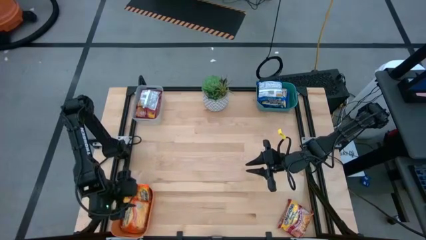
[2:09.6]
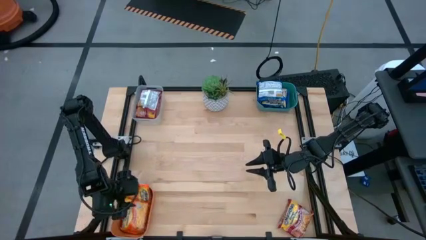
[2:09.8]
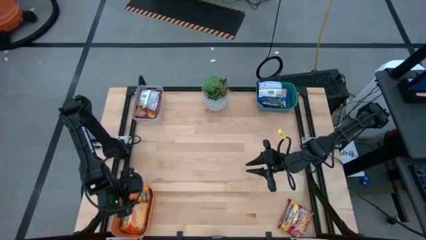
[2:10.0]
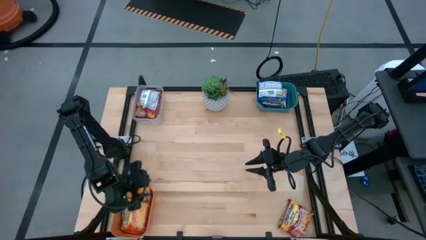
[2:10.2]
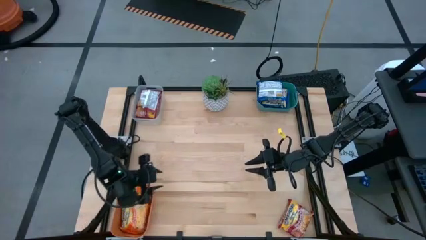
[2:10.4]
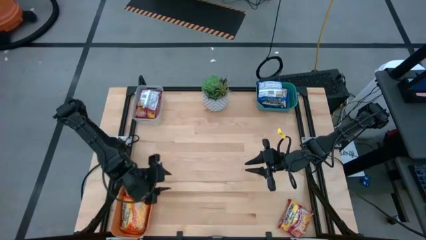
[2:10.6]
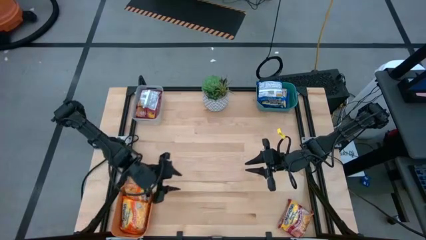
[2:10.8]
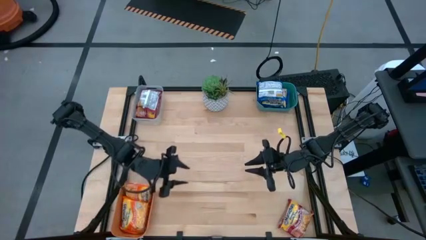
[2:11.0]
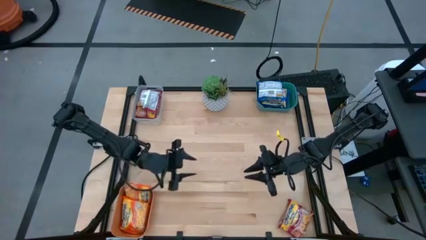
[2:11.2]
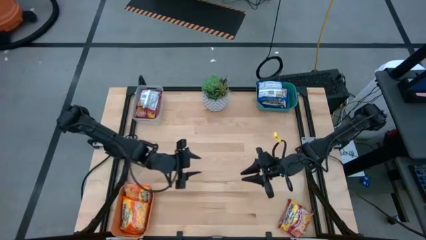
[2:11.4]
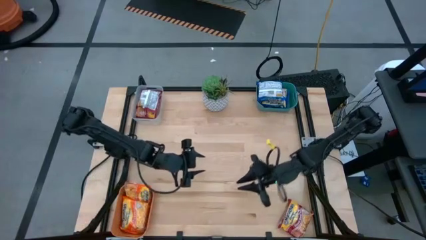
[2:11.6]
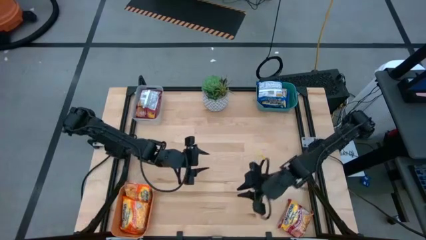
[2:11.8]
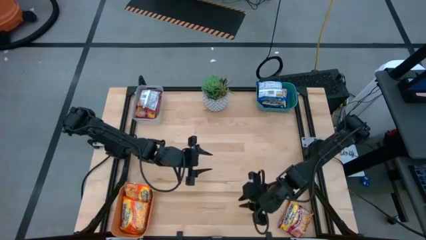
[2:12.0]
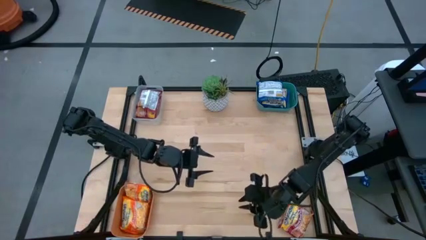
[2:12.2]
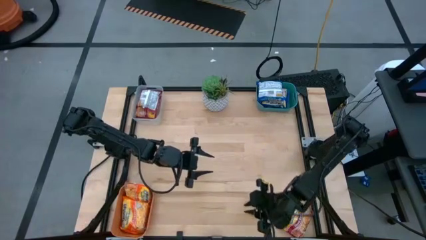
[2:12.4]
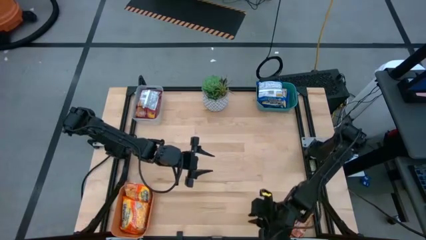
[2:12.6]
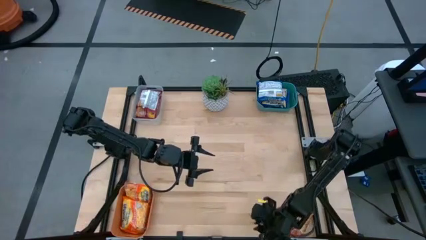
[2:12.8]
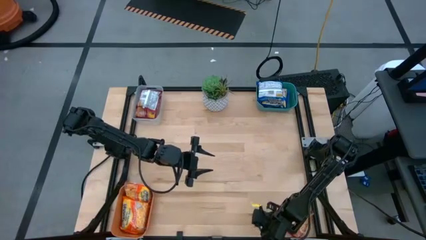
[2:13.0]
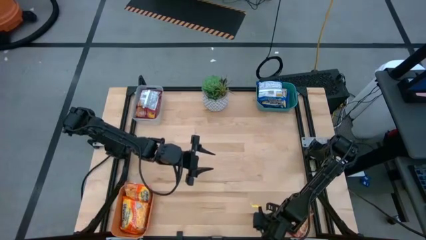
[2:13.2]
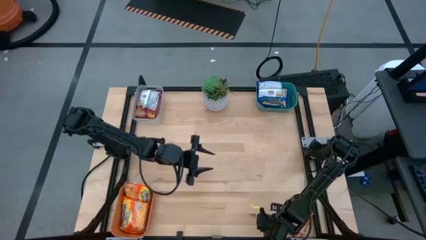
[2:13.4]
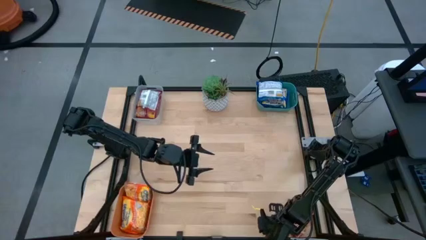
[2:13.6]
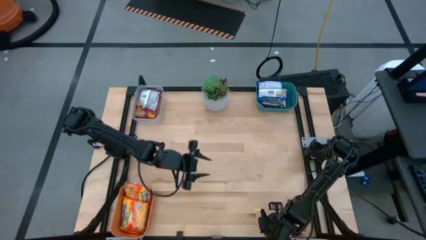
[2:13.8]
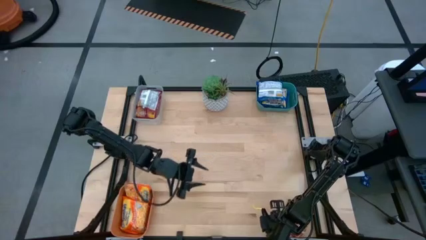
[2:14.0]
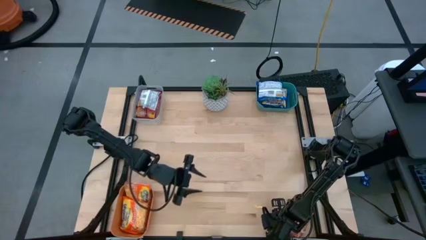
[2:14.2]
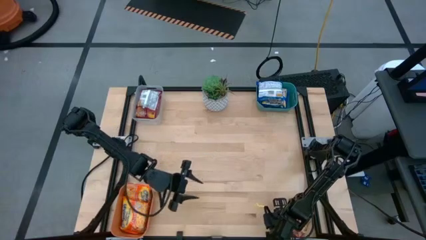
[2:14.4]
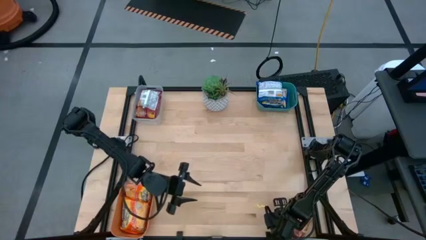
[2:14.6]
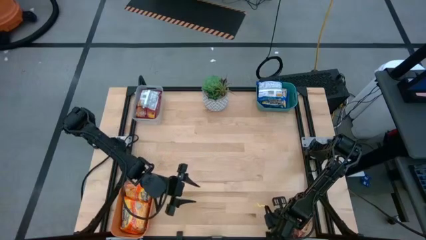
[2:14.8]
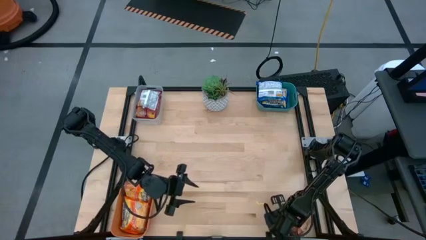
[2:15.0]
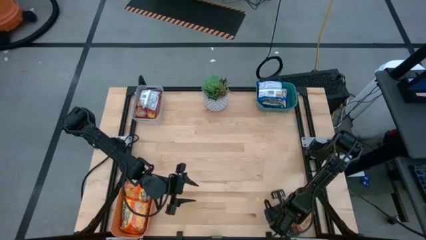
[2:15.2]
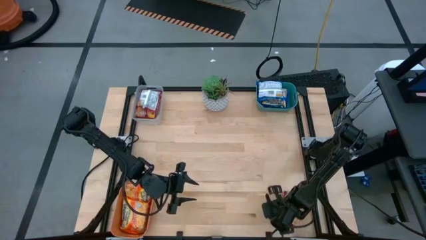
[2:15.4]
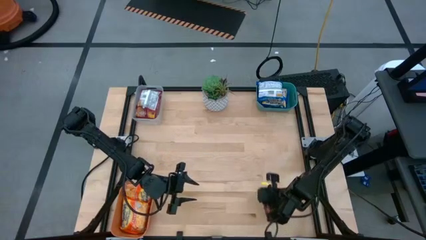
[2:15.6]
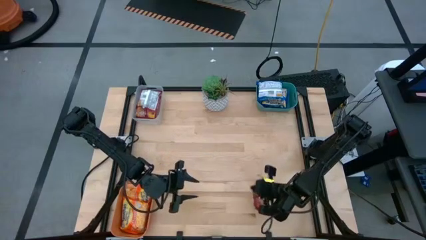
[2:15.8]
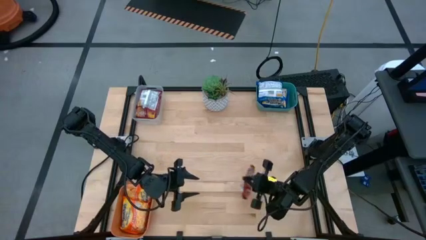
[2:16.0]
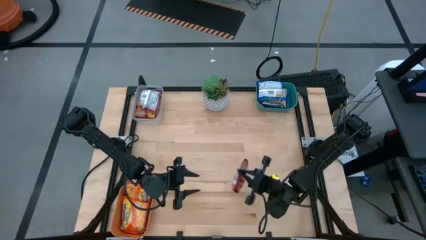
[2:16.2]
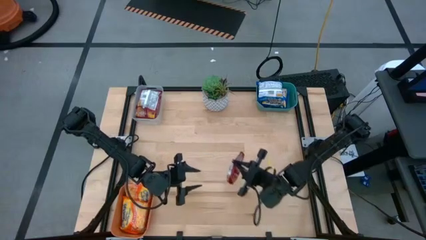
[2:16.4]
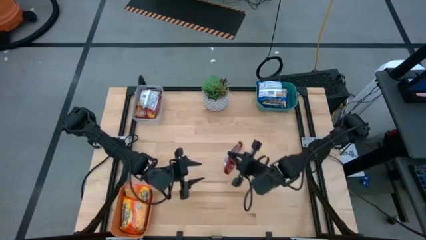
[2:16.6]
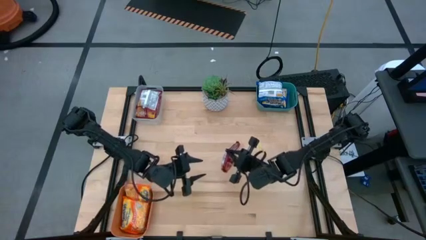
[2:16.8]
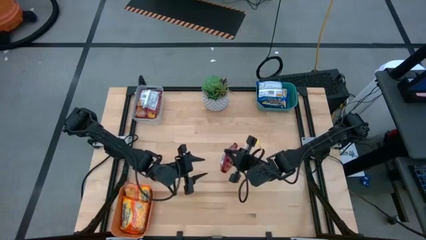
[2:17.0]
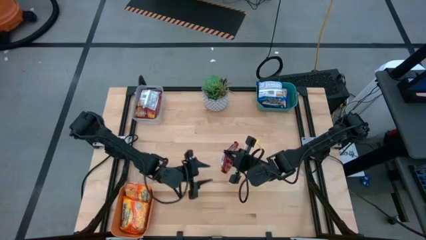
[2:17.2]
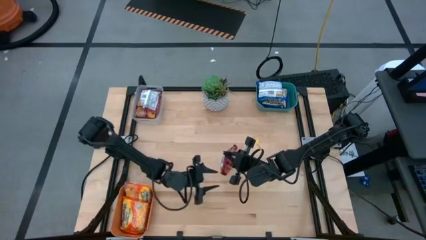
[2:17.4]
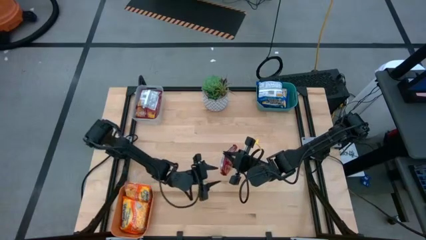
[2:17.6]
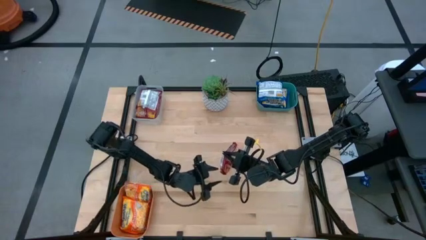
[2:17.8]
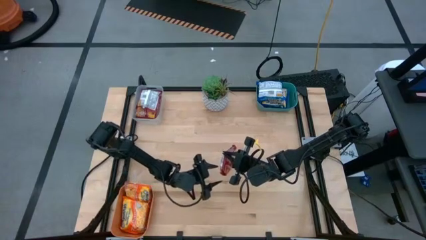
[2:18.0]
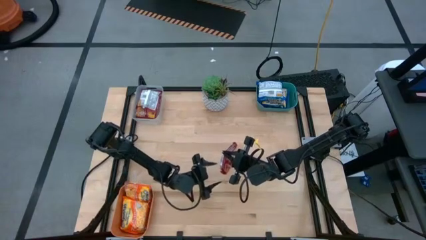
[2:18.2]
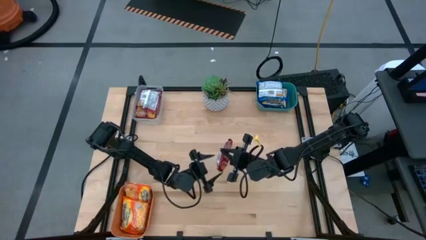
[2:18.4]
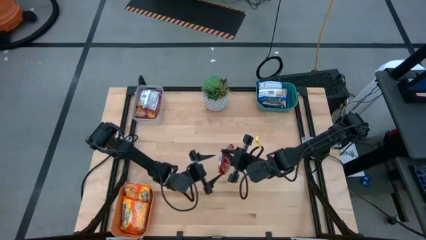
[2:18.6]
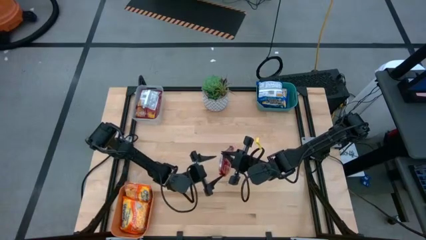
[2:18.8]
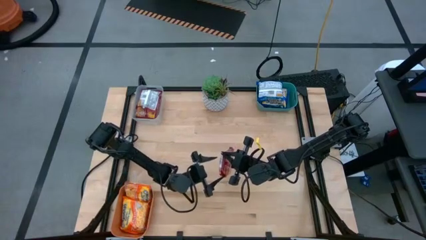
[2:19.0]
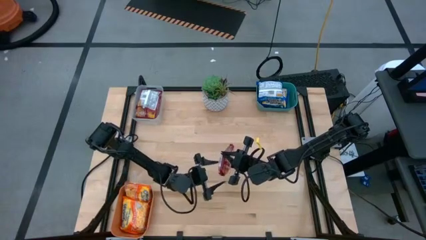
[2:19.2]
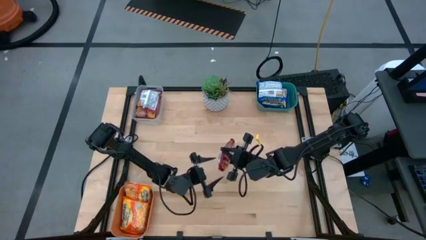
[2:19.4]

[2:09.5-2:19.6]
Task: Sort Maruchan noodles
Put the red noodle pack into the transparent bin

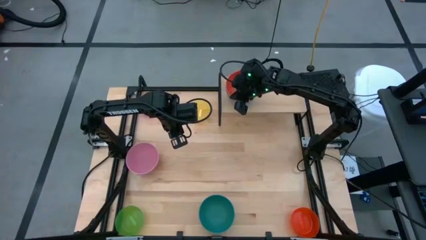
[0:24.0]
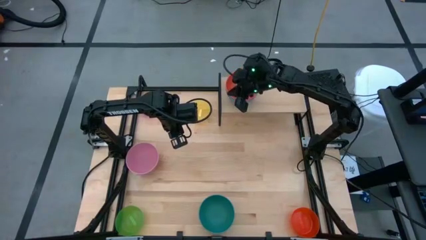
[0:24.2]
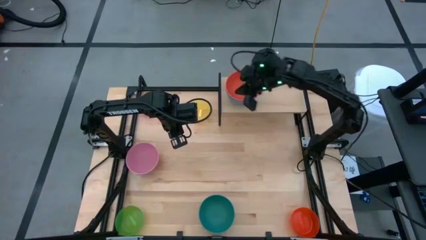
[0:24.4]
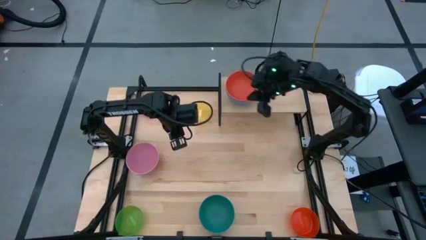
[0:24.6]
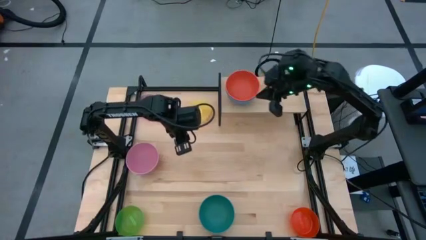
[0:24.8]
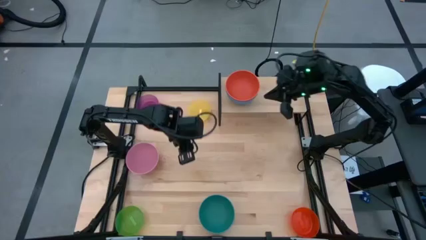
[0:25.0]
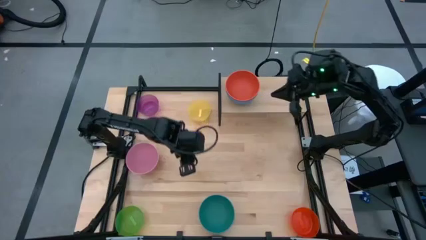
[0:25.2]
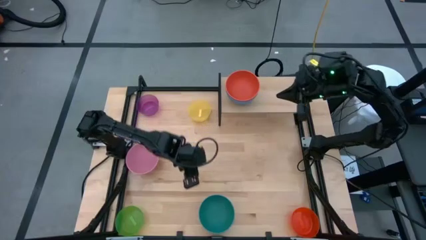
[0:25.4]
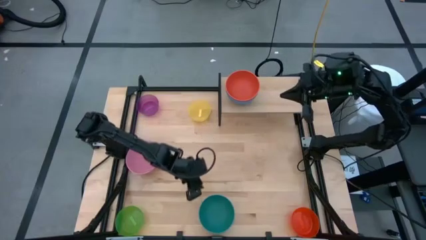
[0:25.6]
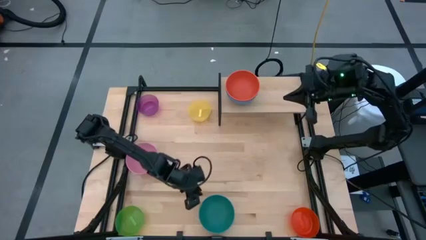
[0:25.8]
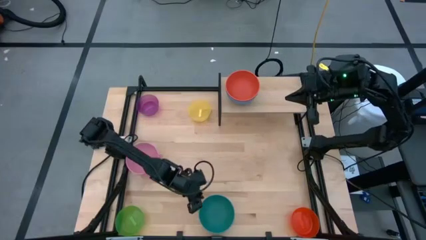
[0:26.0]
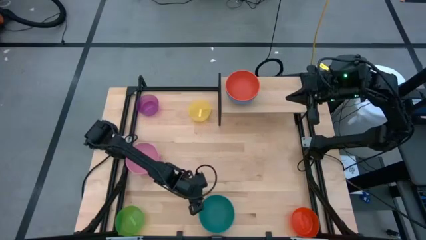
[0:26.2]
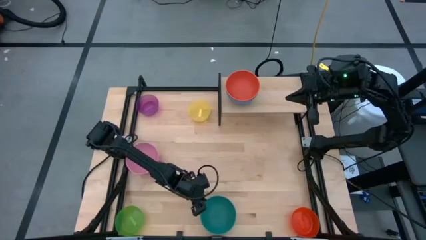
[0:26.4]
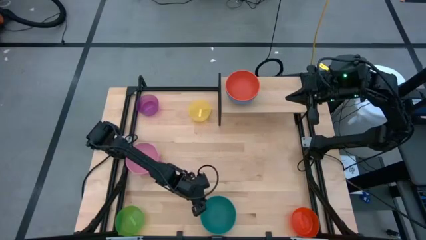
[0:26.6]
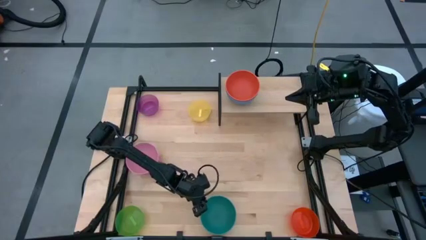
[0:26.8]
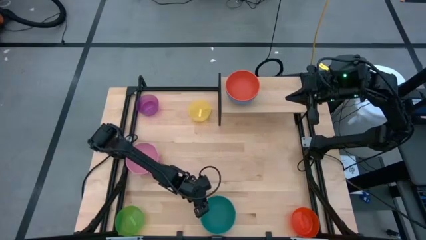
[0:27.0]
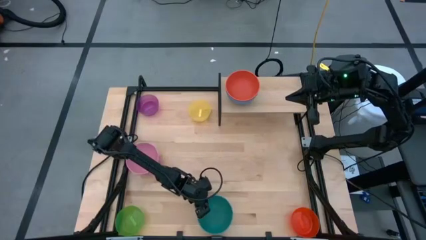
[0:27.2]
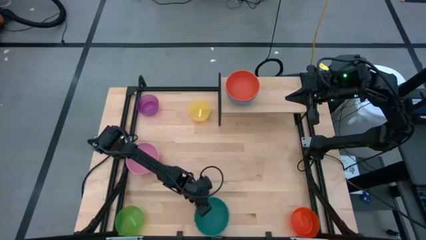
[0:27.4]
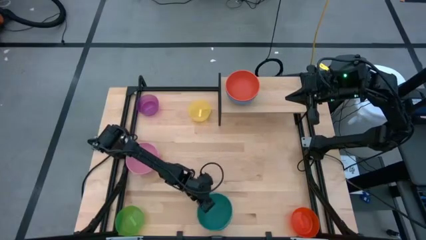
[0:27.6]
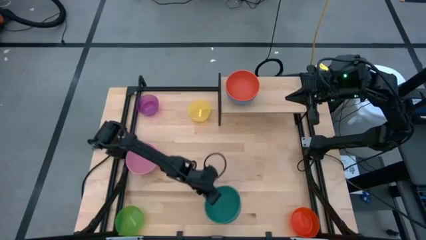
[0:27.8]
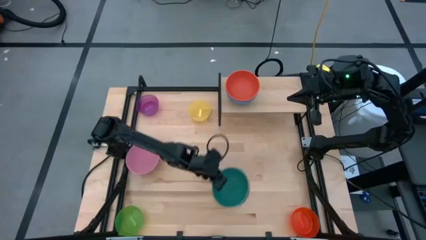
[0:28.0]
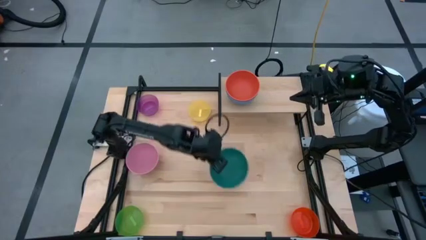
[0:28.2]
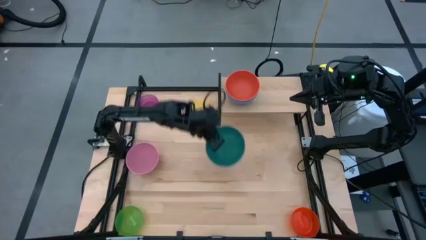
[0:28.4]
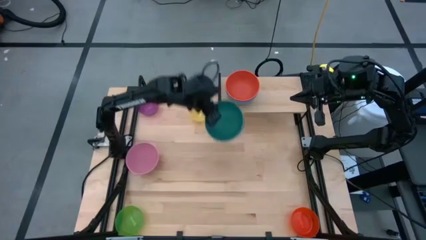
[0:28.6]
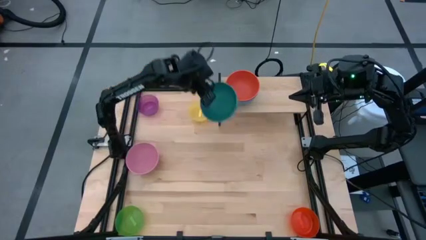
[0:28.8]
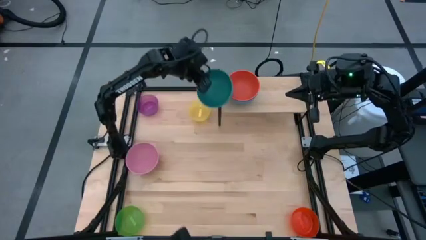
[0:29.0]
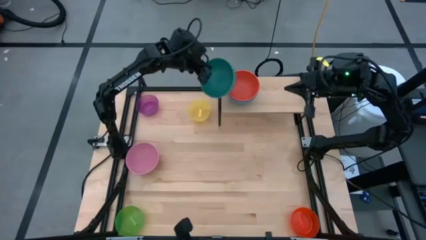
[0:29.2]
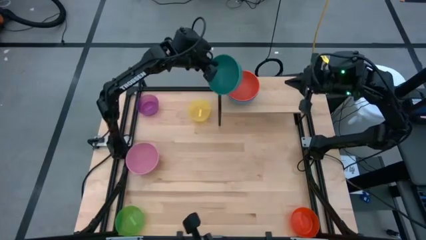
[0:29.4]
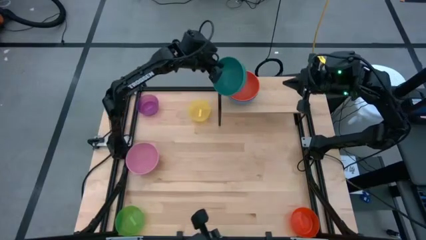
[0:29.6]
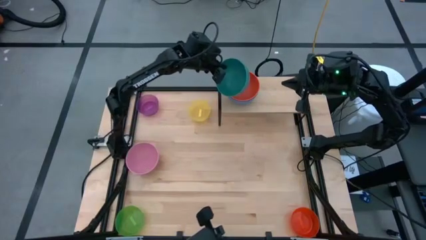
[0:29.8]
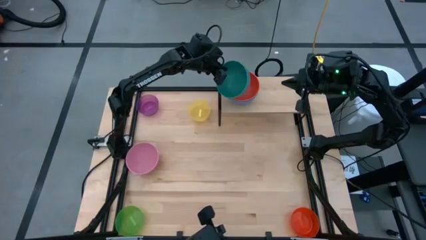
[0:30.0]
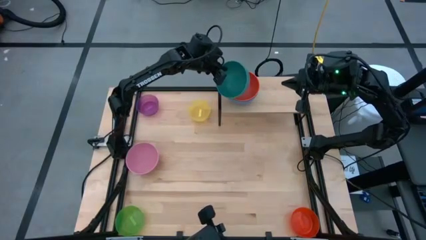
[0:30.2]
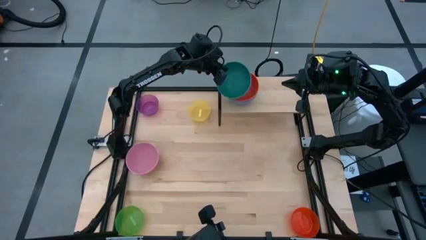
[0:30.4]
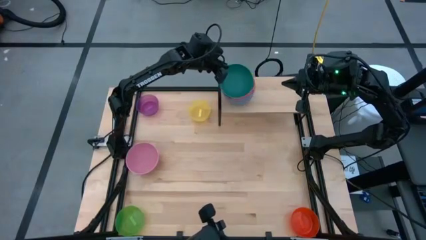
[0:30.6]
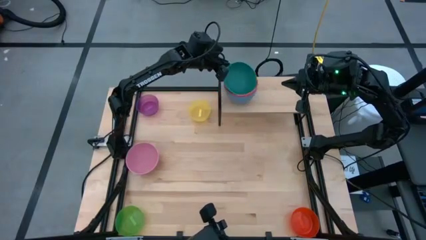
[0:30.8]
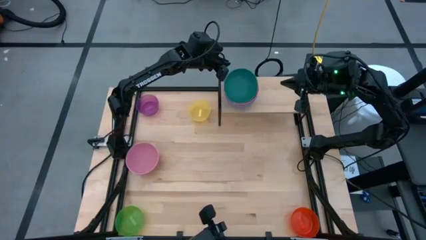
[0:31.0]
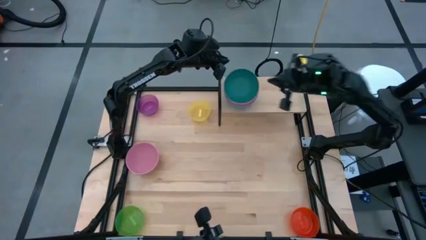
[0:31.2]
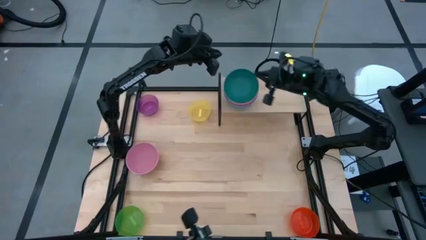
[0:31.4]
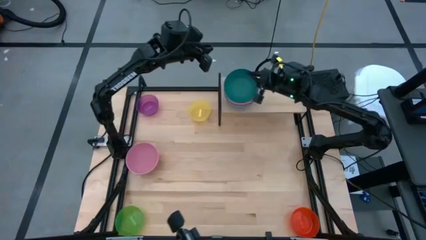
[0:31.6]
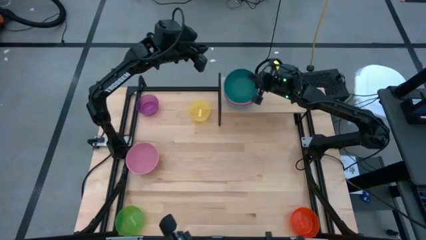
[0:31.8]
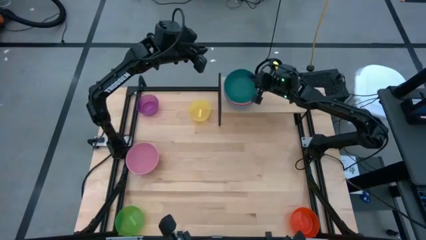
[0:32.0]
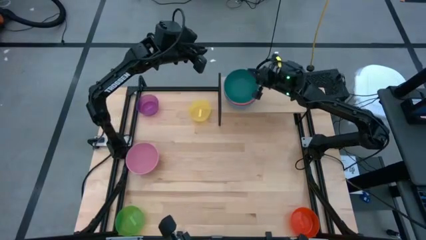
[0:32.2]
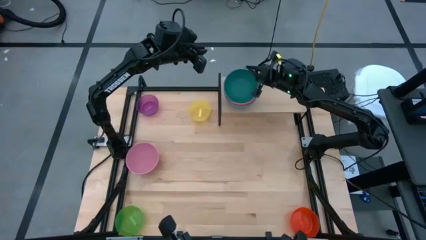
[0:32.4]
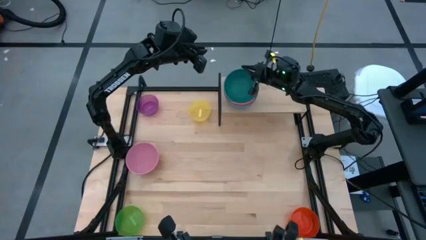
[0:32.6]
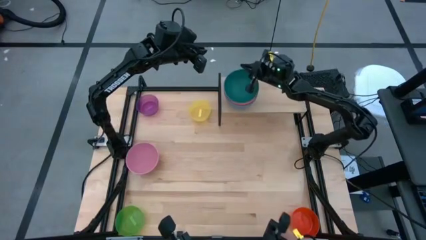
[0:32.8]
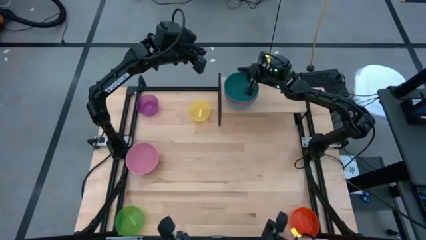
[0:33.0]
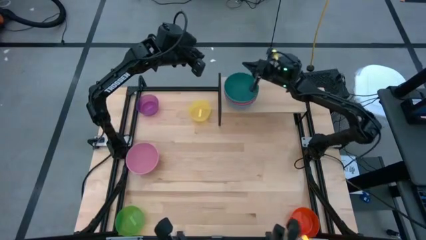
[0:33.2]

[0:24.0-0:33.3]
Task: Place and stack bowls onto a shelf
Stack the dark blue bowl on the shelf
